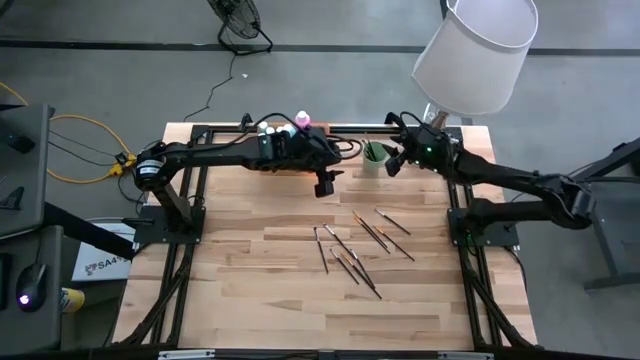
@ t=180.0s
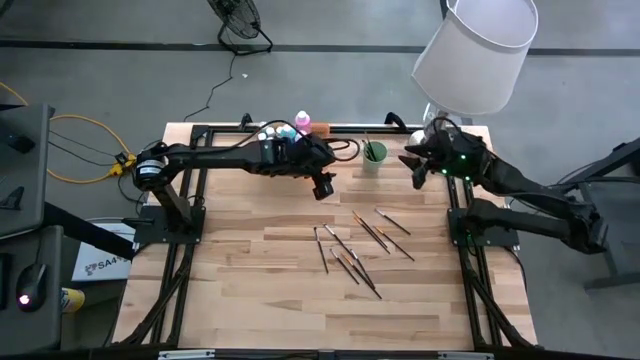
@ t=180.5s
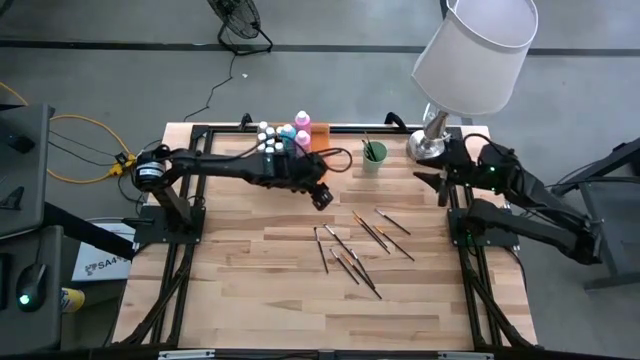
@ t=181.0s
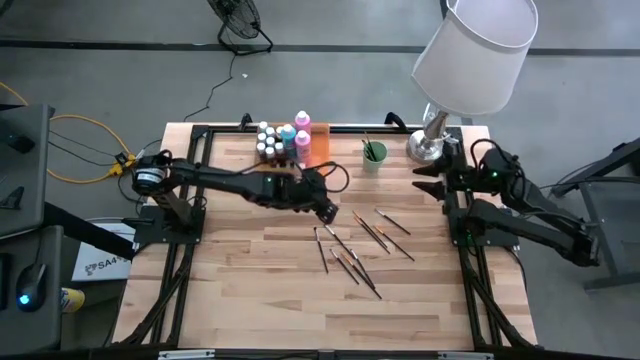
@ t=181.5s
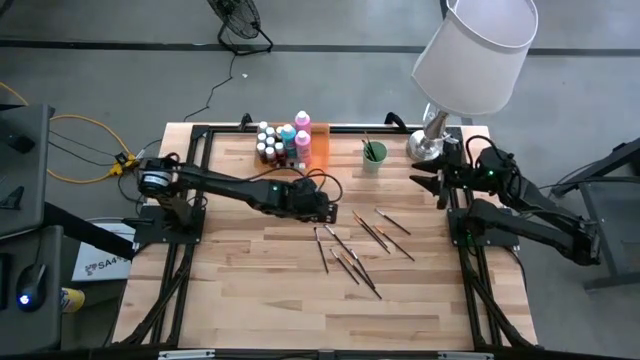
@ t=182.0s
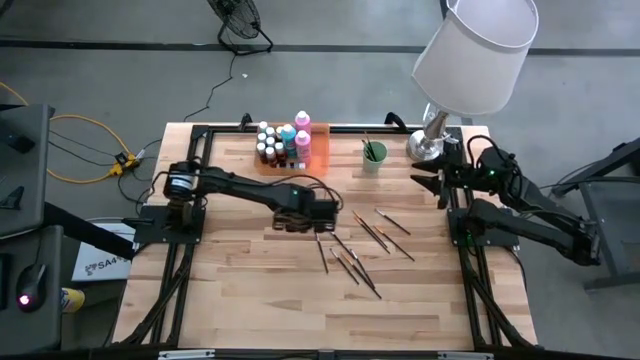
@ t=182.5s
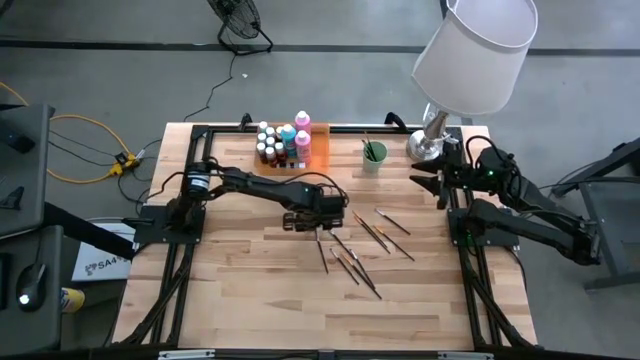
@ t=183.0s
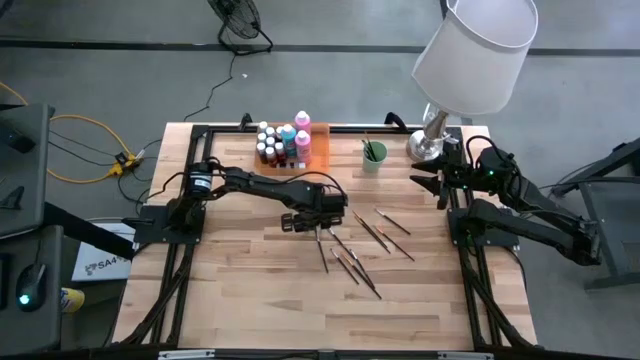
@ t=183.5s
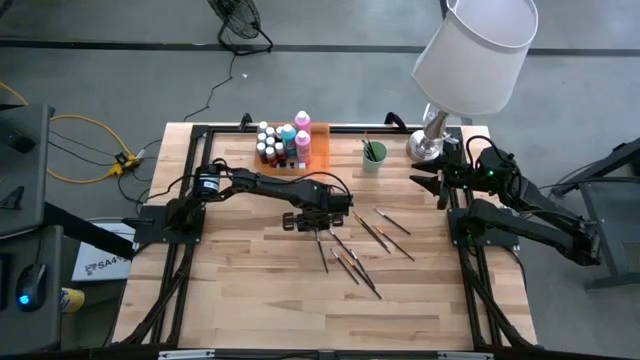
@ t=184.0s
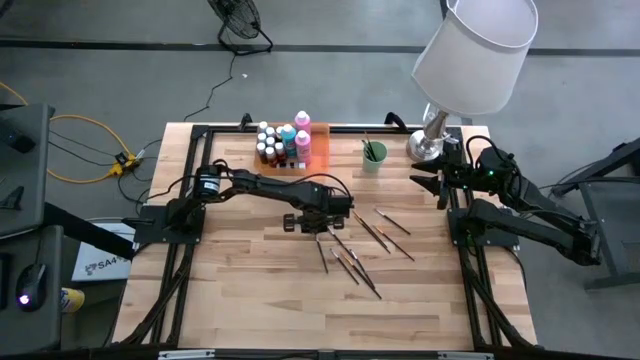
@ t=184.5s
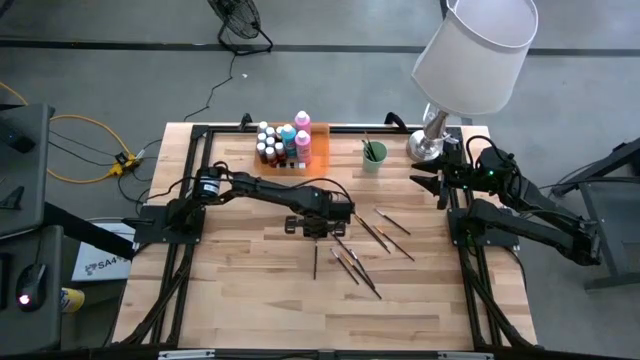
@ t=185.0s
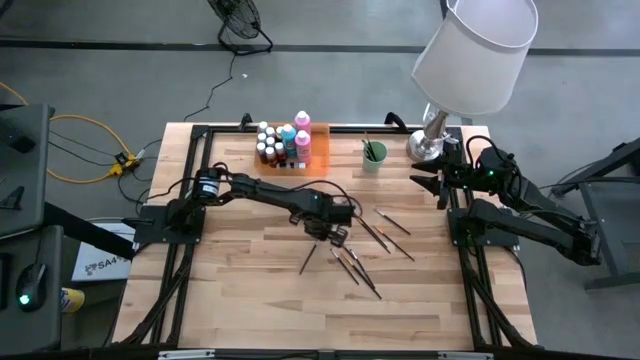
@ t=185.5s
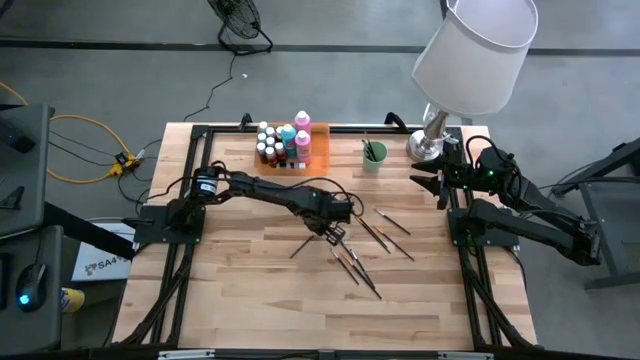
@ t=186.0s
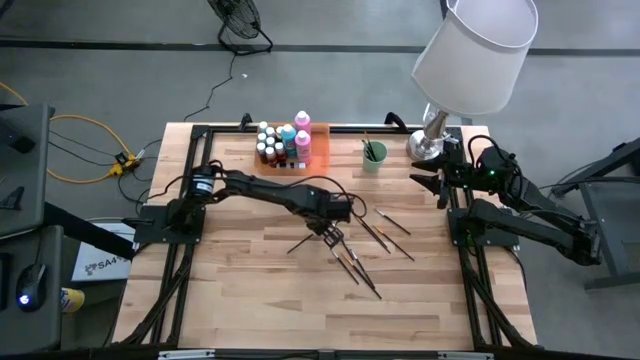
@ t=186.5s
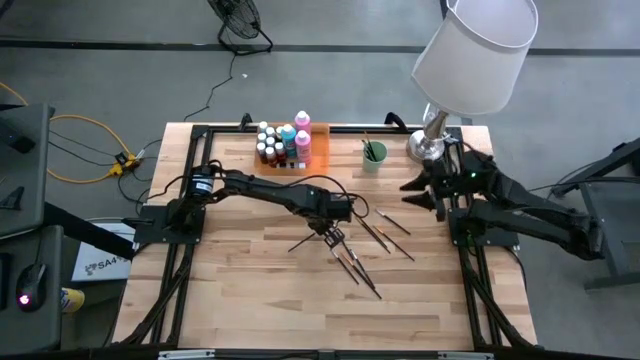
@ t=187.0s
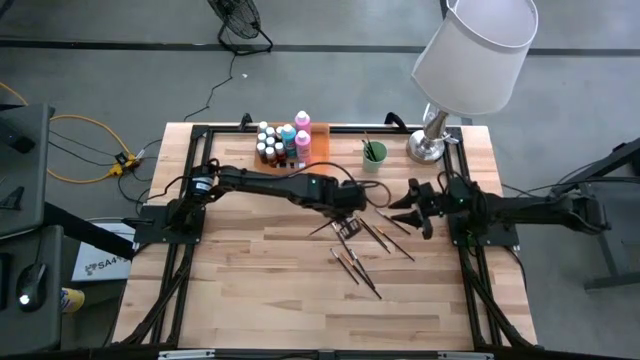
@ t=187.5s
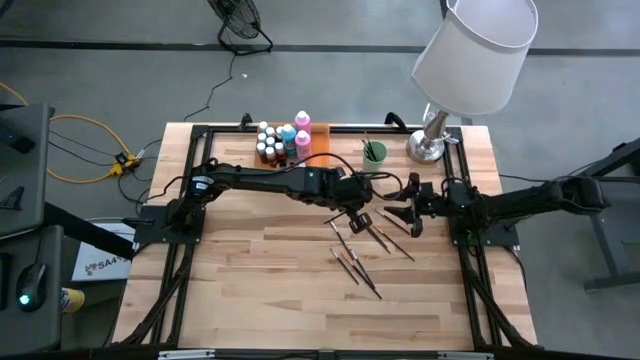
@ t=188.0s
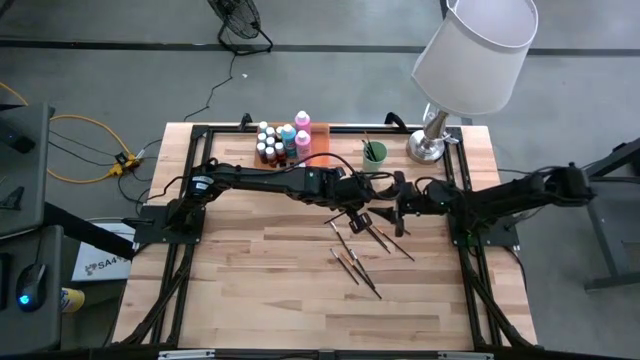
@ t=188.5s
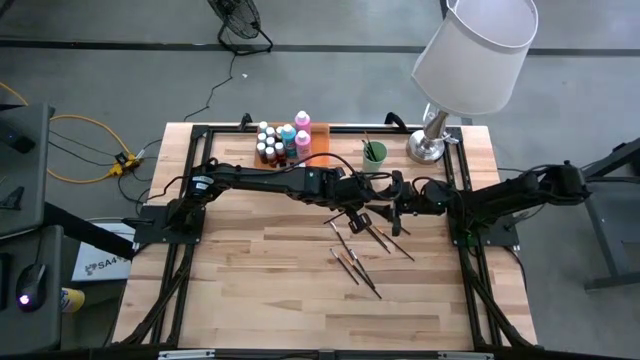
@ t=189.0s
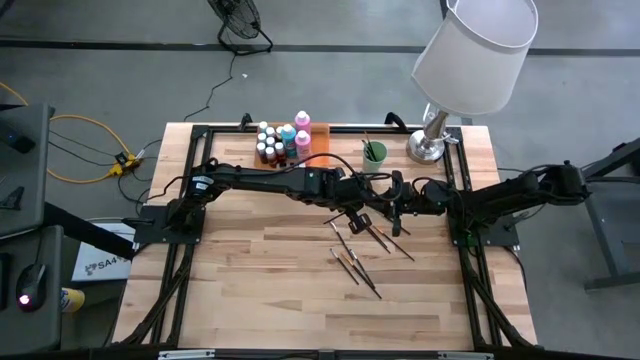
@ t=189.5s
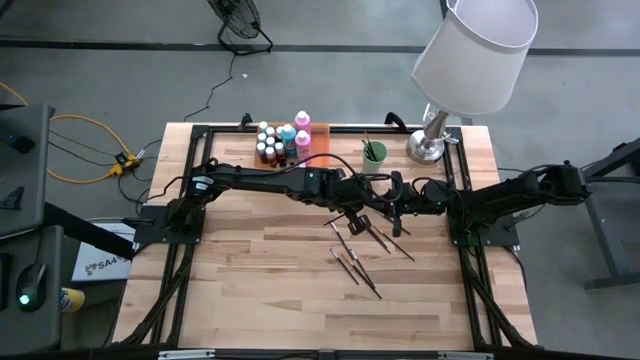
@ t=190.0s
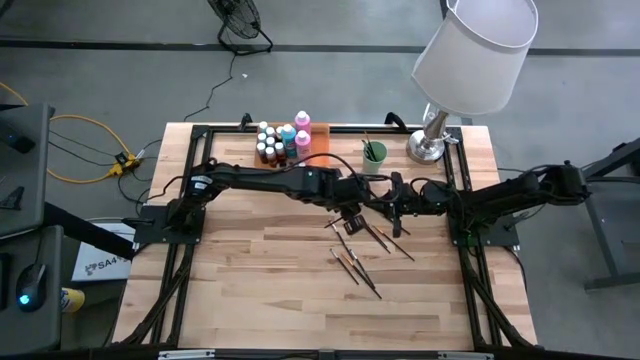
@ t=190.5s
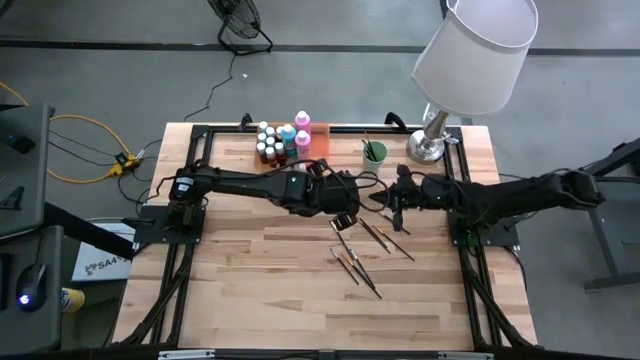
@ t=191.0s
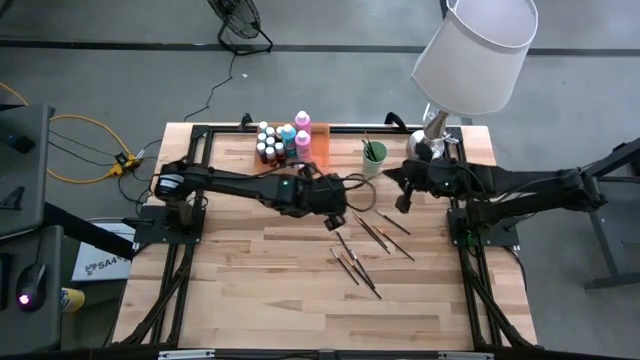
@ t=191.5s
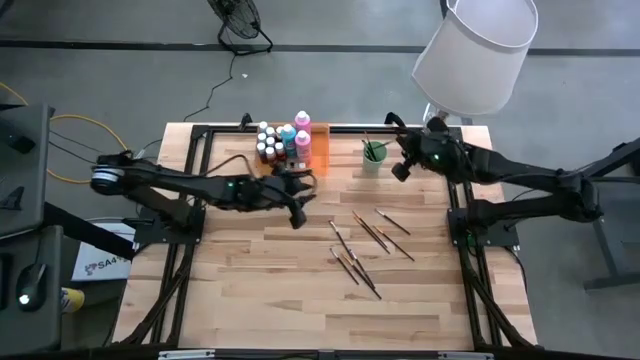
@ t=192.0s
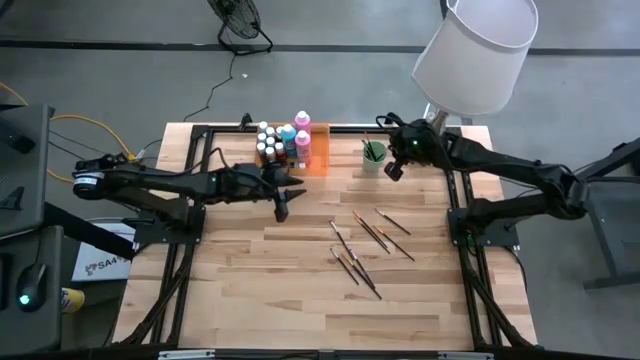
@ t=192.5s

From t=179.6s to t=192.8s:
Task: Pick & Place Paint Supplies
Put the silver paint brush into the green cup

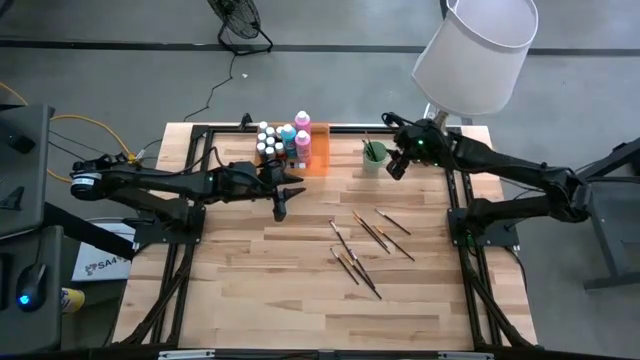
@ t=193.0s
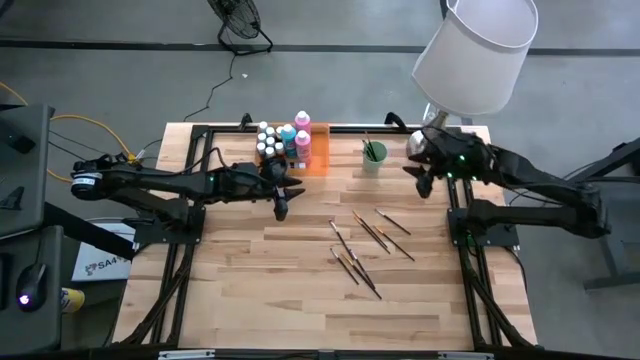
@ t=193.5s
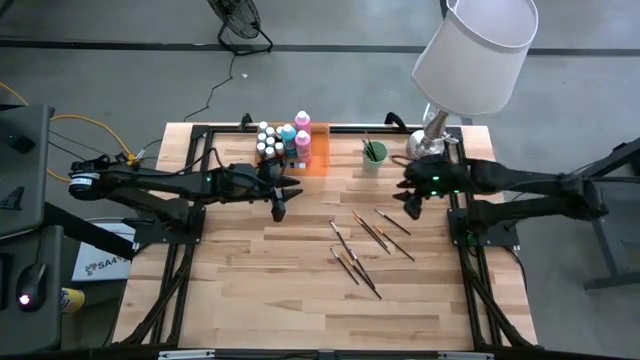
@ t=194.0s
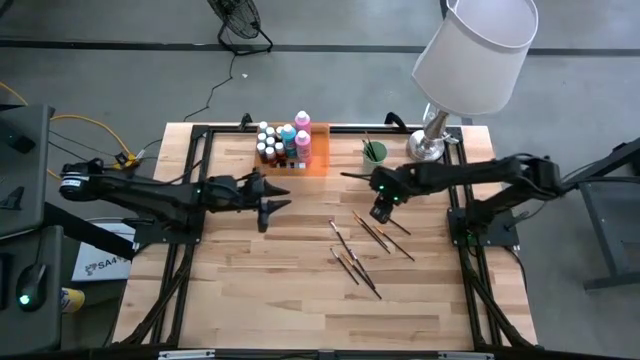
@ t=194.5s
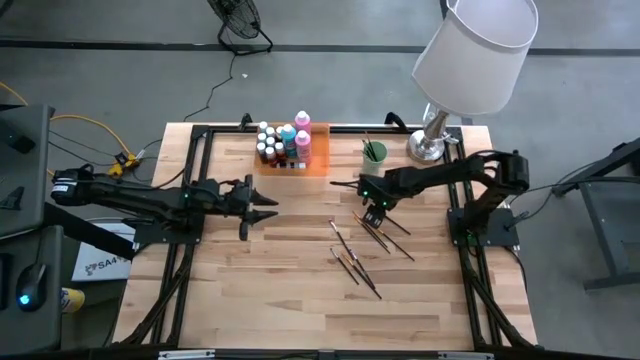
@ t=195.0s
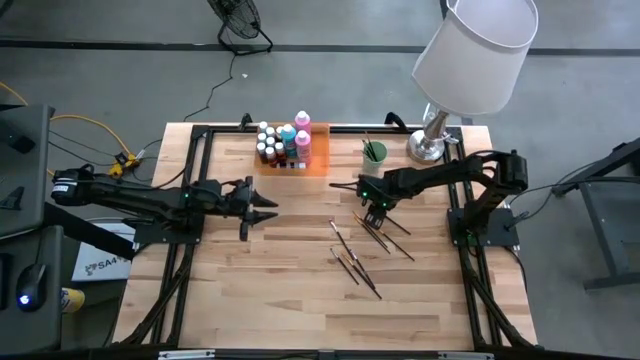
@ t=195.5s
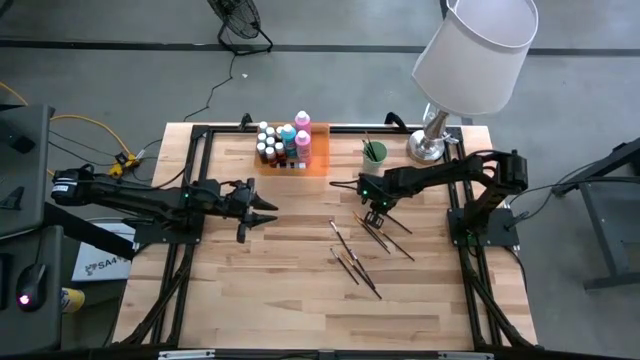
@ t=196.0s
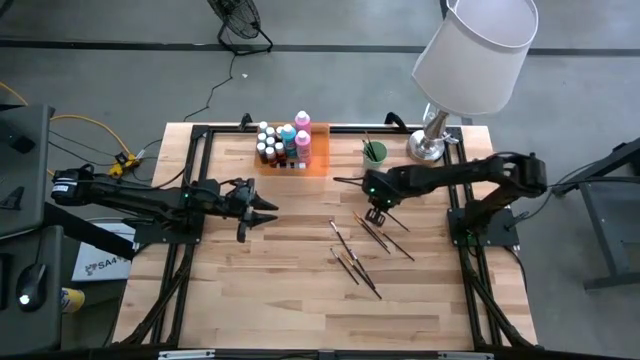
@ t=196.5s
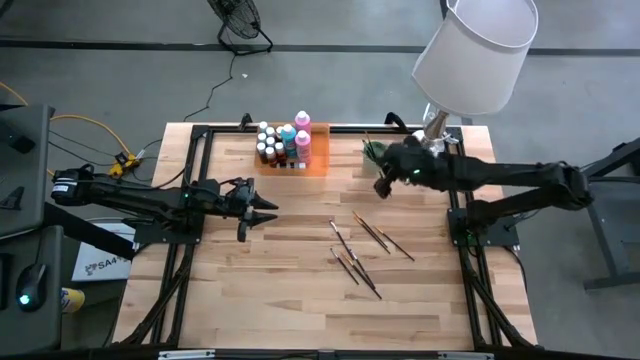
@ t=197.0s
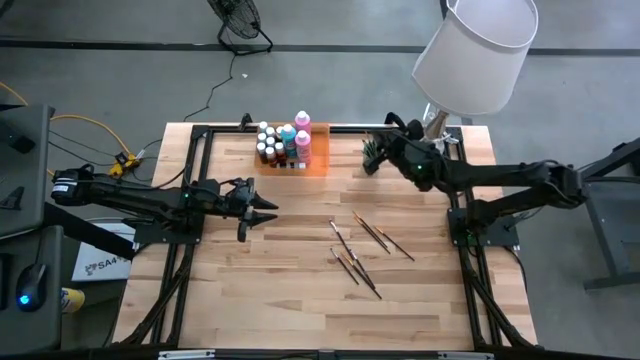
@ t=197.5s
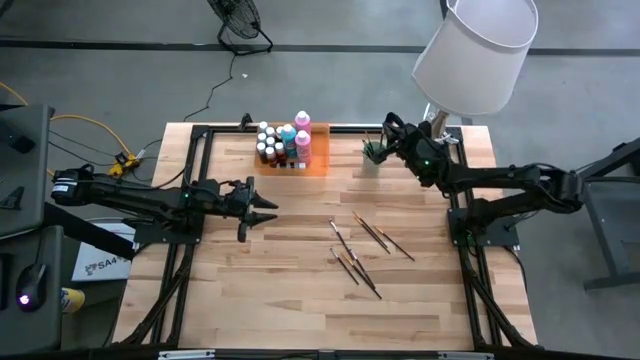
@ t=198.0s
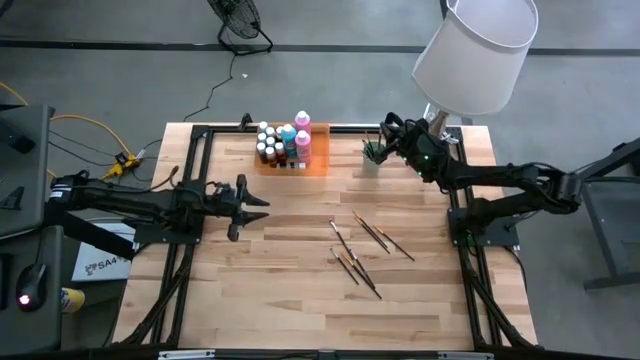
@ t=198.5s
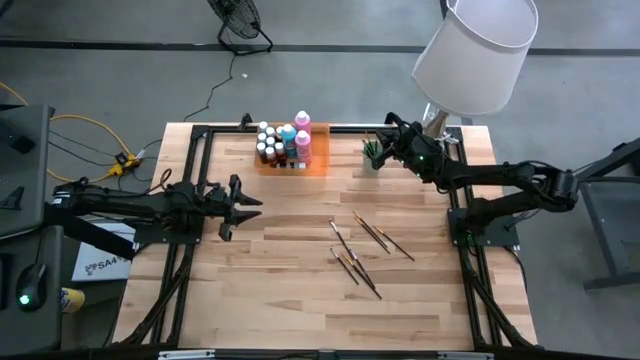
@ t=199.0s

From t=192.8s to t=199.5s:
Put the silver paint brush into the green cup
